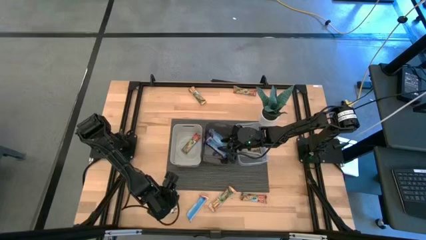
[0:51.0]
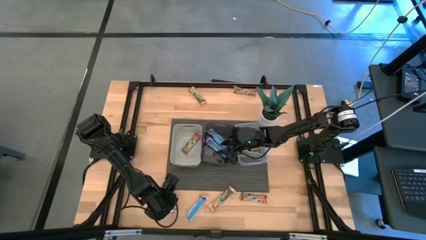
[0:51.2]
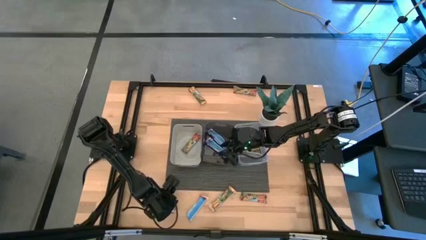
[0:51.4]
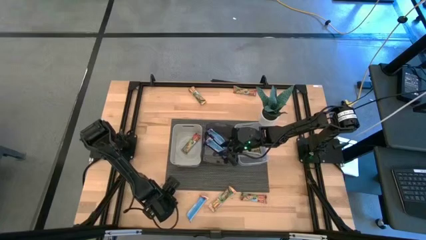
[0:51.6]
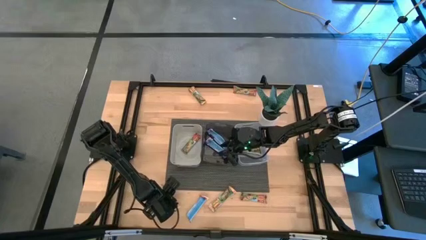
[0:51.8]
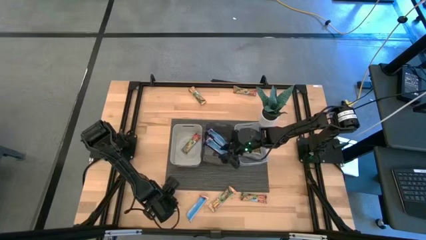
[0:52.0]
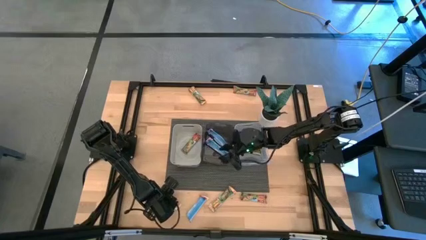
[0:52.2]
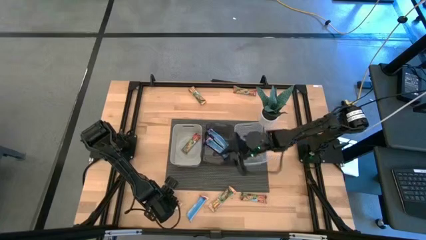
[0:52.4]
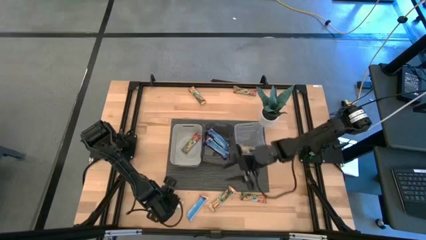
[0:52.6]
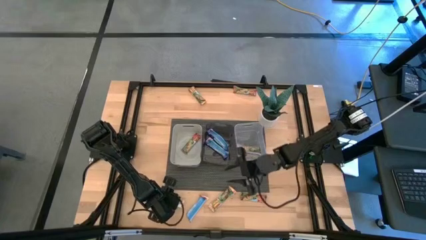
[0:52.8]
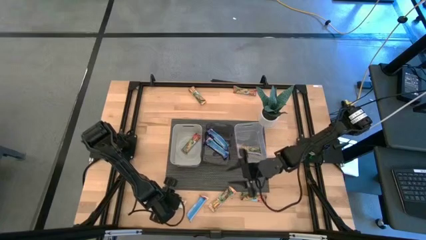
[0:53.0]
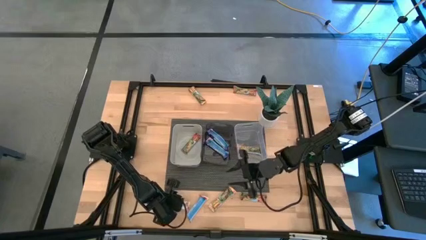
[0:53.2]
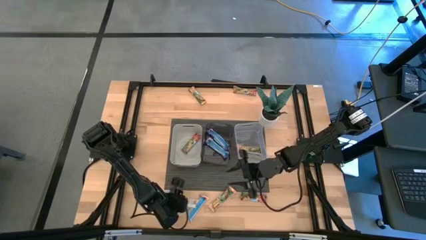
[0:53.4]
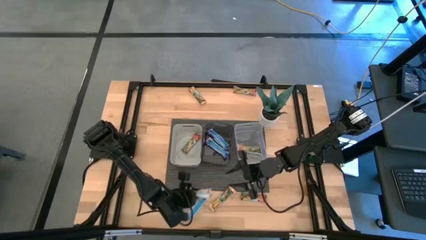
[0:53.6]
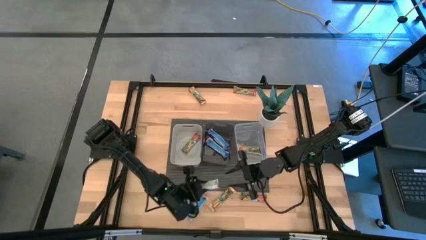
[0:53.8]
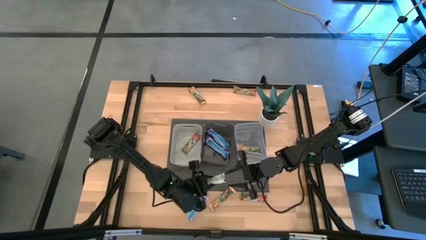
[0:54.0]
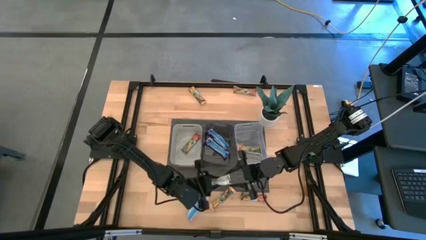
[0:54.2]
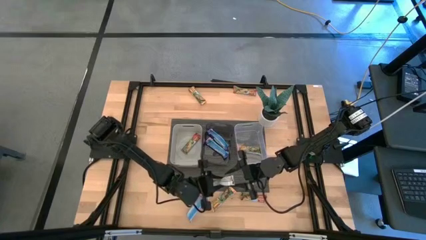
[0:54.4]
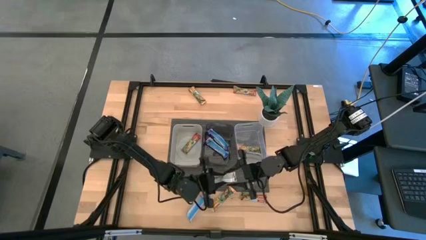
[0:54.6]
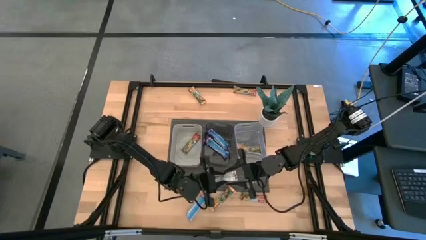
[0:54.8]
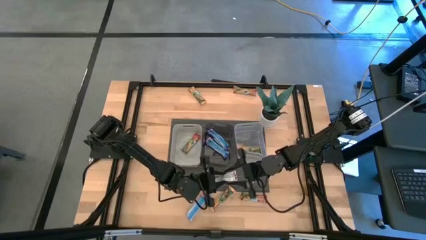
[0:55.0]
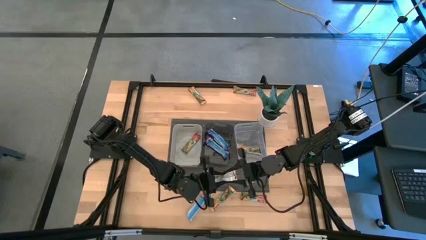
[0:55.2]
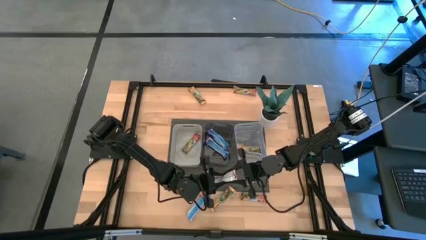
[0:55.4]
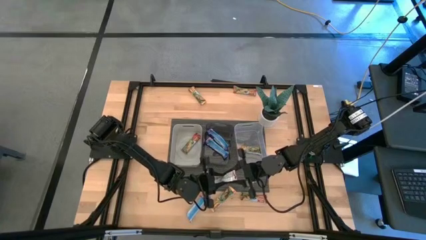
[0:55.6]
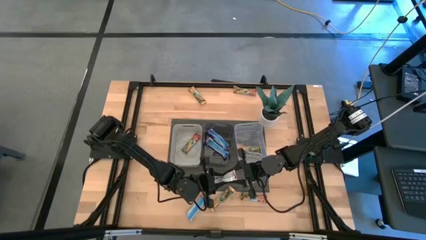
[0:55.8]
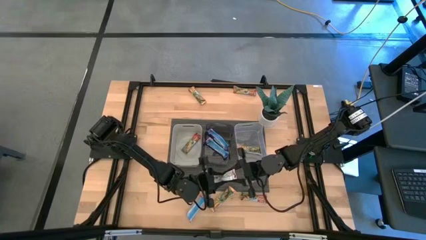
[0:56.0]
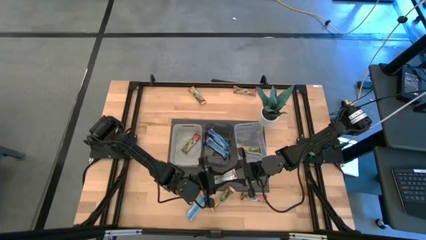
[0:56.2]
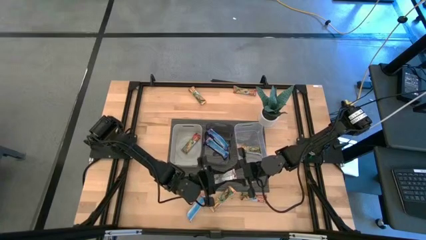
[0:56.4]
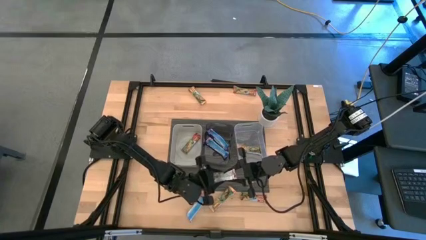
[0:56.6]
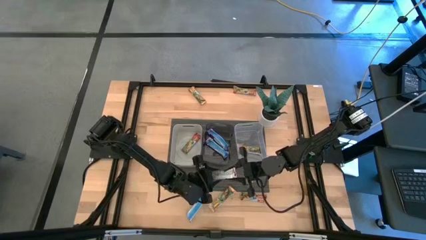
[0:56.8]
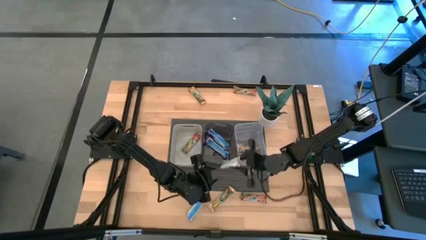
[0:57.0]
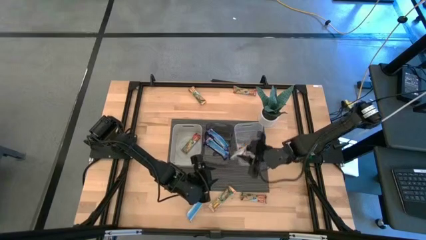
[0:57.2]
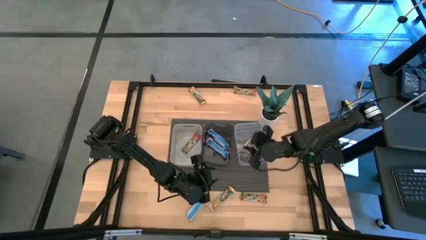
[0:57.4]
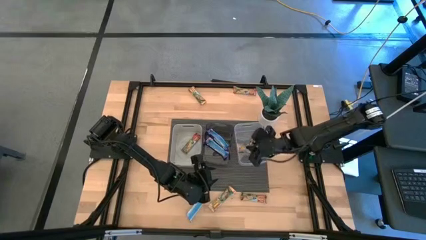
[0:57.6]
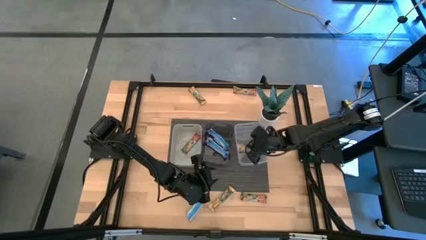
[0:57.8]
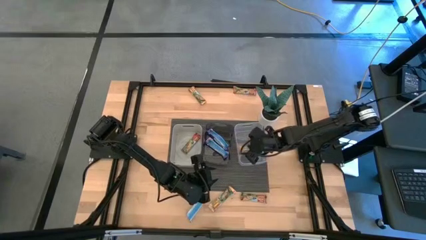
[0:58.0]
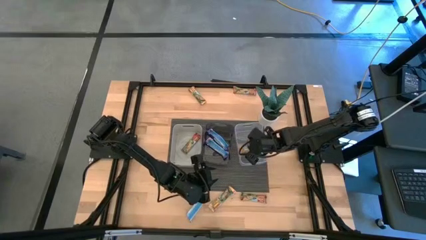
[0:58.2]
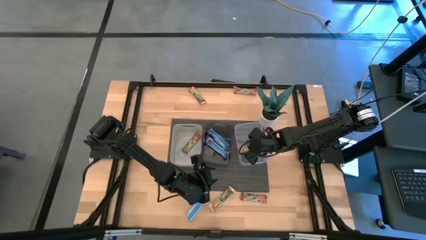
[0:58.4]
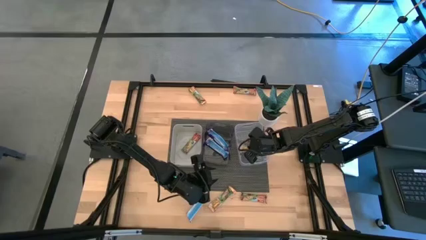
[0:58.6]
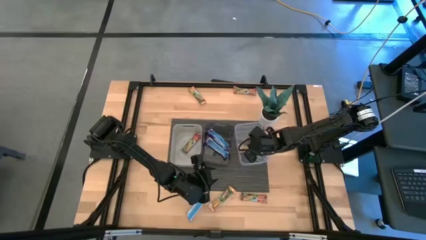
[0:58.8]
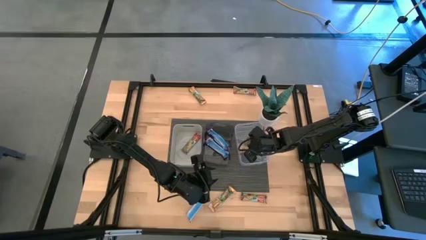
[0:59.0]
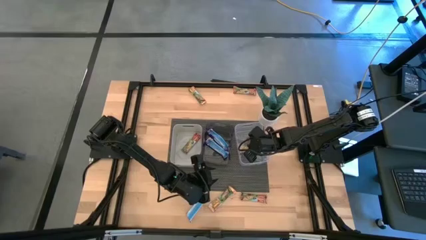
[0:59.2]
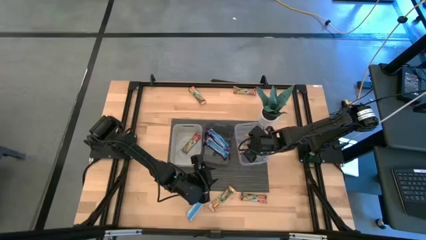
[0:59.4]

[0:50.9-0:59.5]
Task: Pick and place Granola Bars by type
Put the orange granola bar into the transparent bin

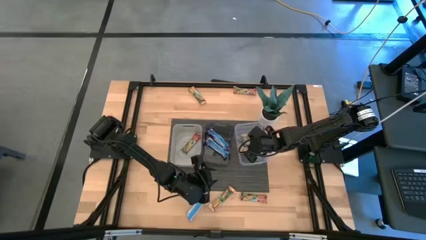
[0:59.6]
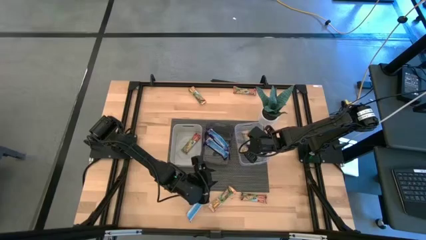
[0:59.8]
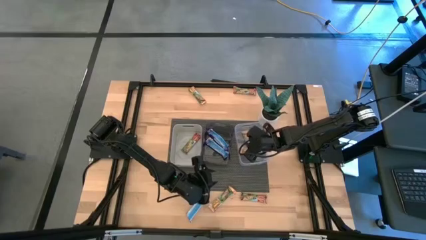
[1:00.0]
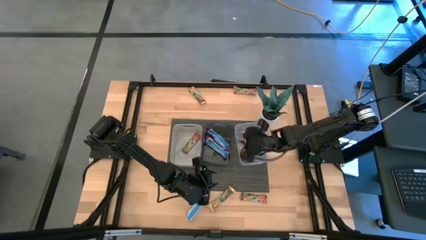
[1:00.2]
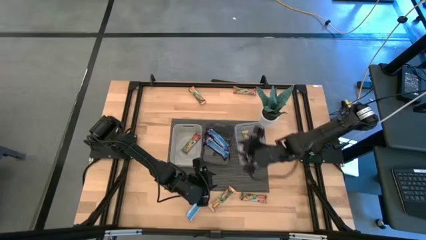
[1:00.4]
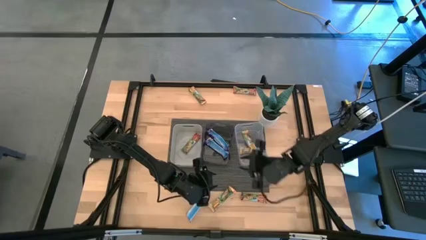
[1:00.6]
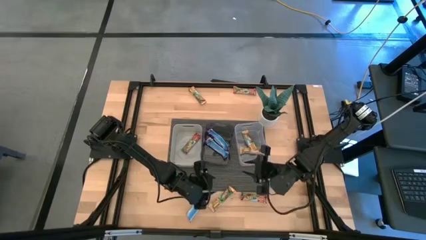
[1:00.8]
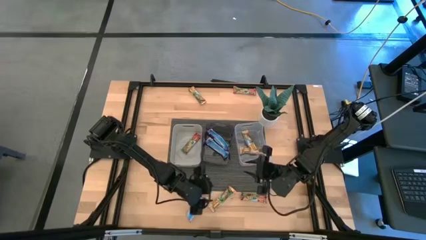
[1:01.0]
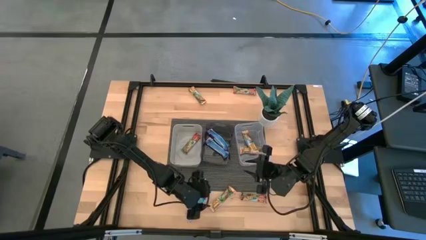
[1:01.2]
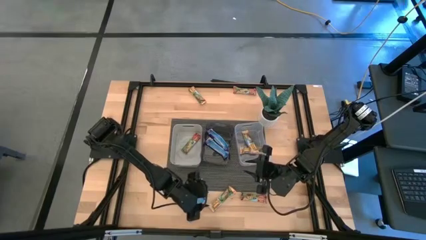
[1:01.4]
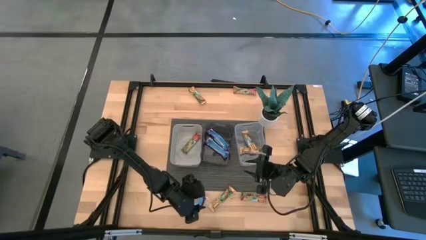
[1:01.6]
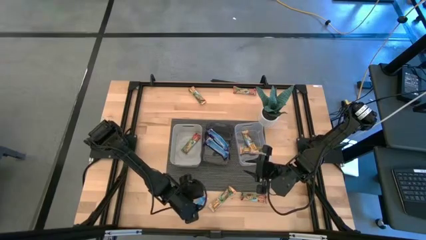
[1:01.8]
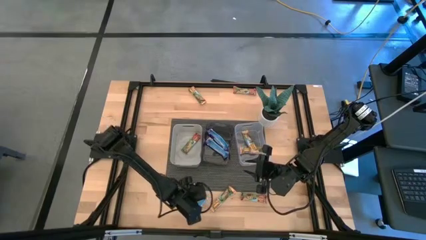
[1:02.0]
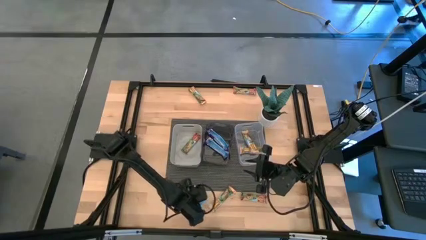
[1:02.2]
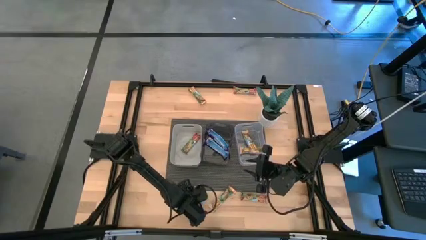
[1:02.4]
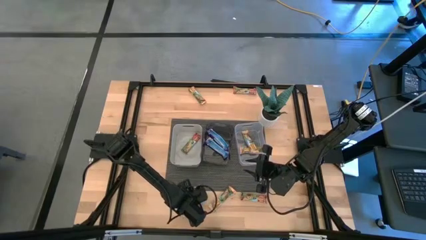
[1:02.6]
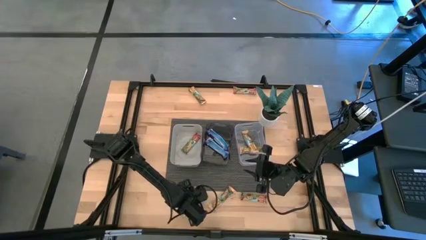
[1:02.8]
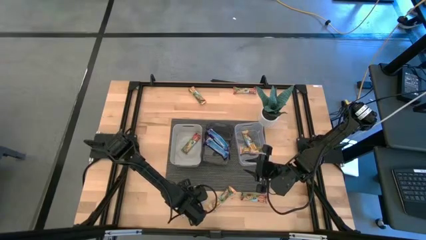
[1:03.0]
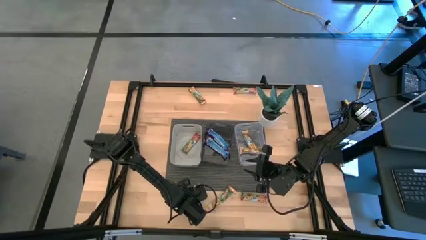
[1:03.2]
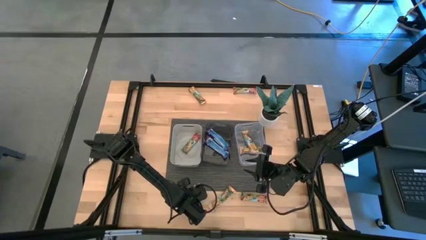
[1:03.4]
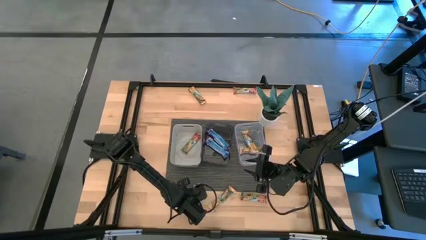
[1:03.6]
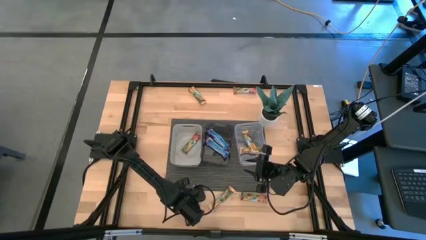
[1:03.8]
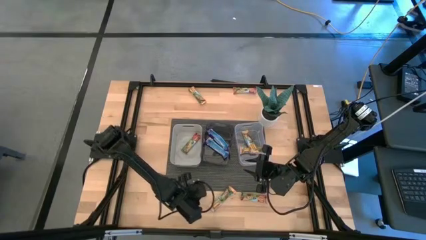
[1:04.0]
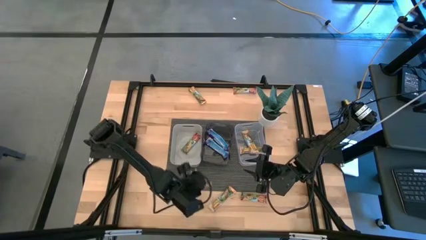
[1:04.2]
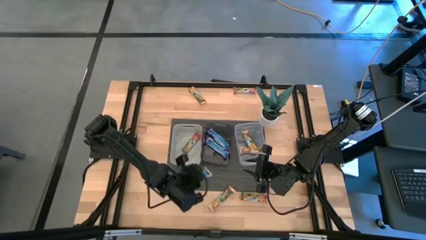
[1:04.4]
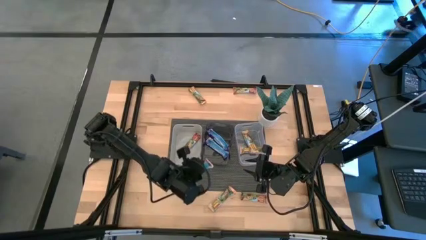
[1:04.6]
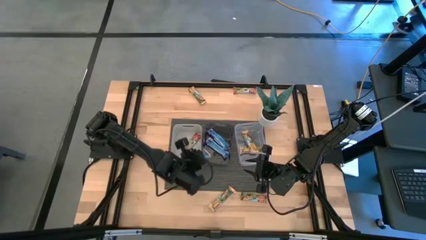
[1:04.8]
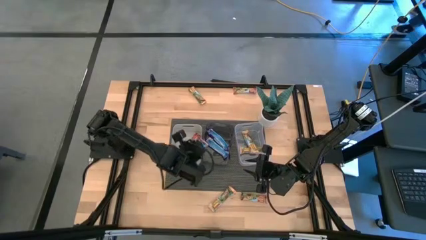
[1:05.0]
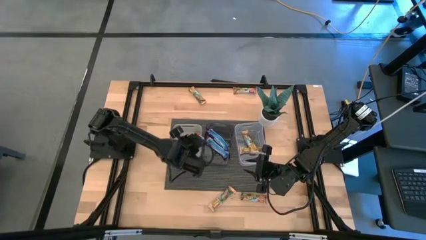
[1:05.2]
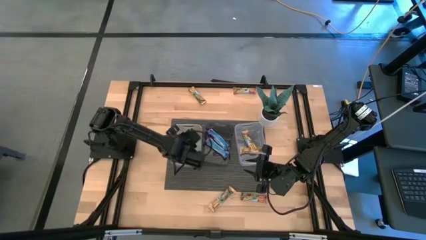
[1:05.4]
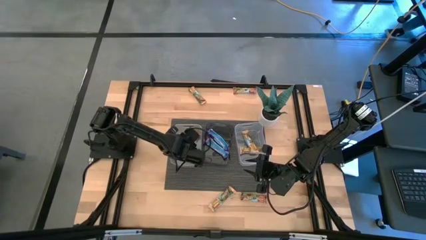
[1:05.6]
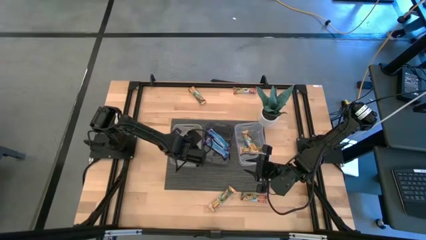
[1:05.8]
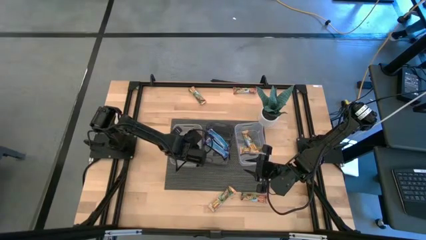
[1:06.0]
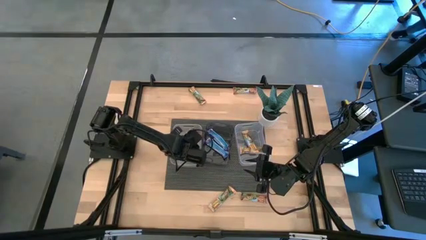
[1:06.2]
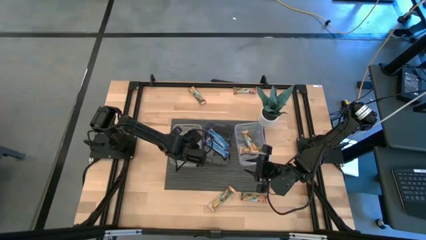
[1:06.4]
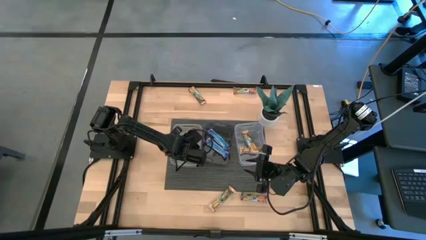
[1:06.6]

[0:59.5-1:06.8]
Put the red granola bar into the gray bin
